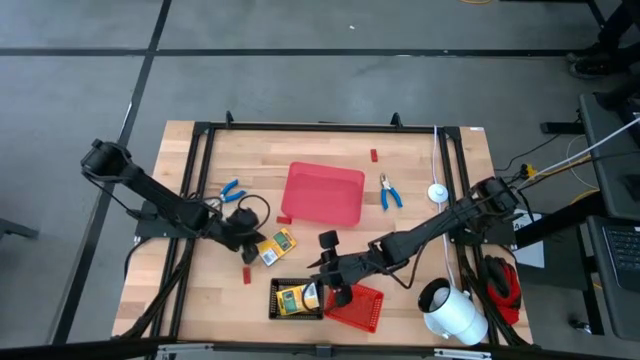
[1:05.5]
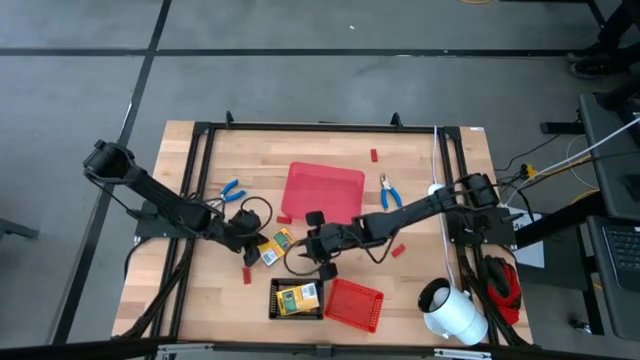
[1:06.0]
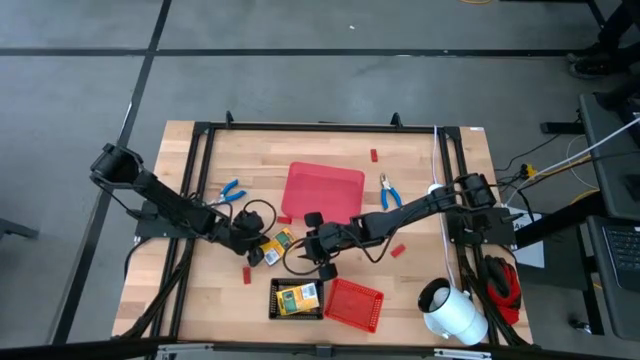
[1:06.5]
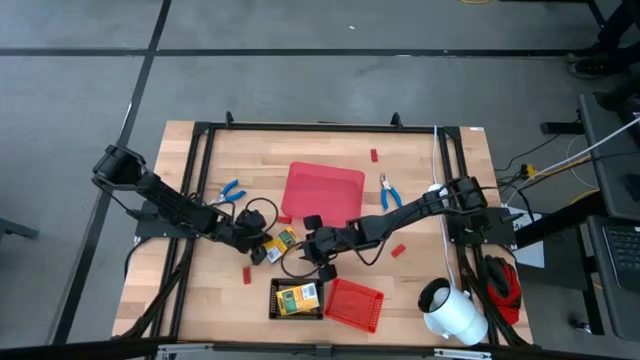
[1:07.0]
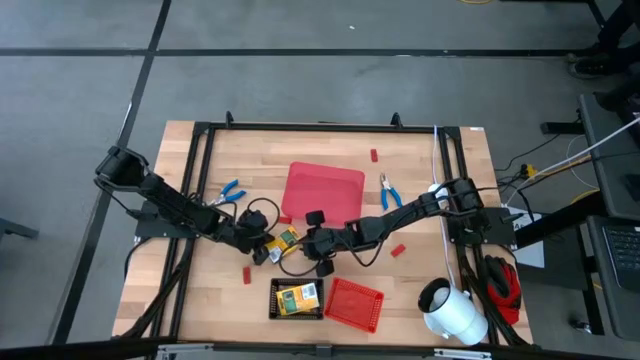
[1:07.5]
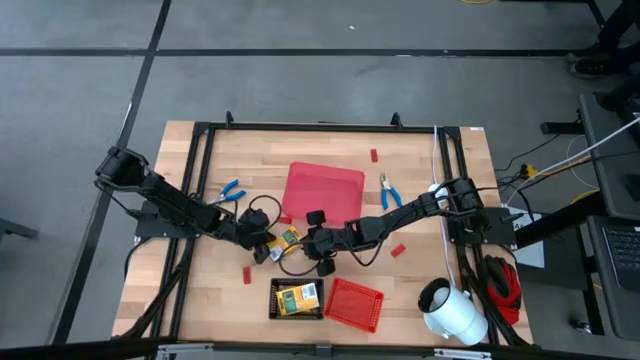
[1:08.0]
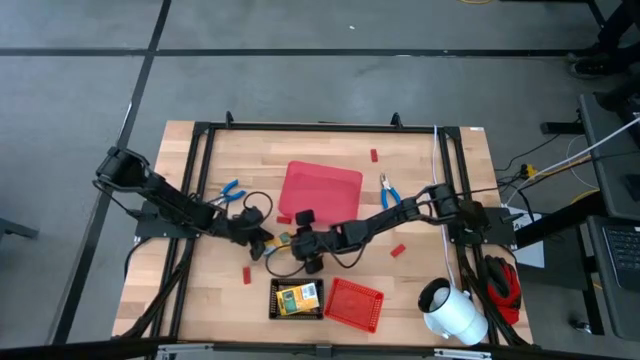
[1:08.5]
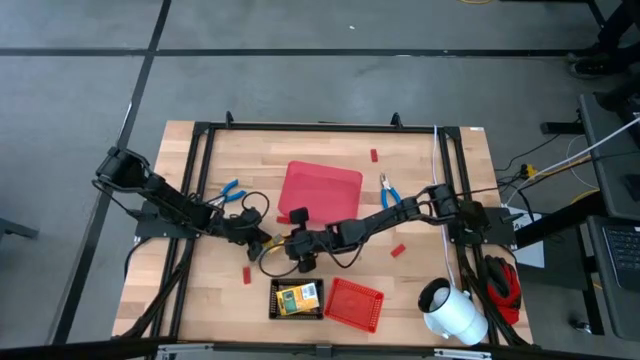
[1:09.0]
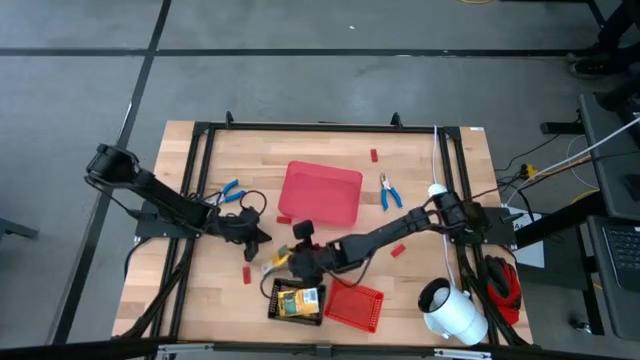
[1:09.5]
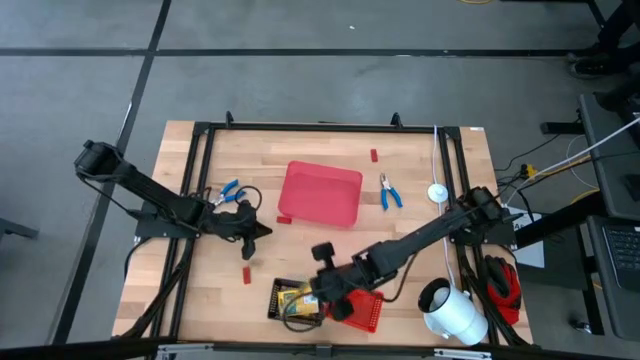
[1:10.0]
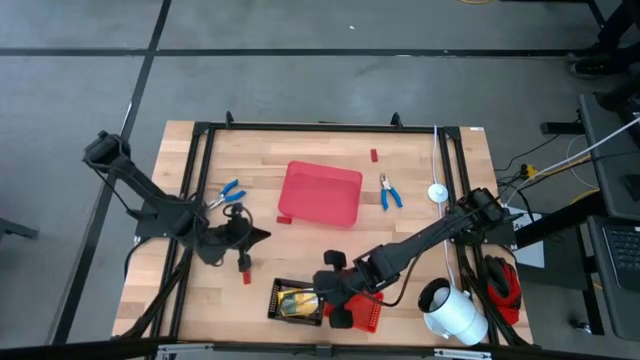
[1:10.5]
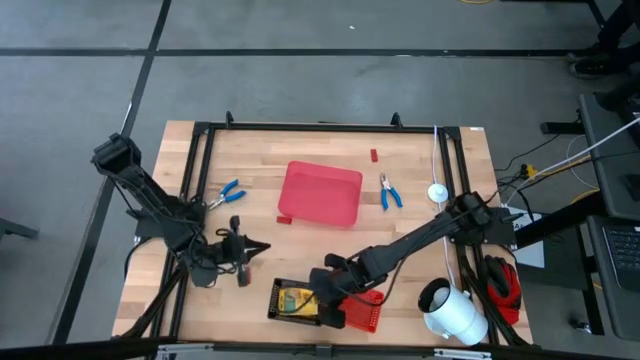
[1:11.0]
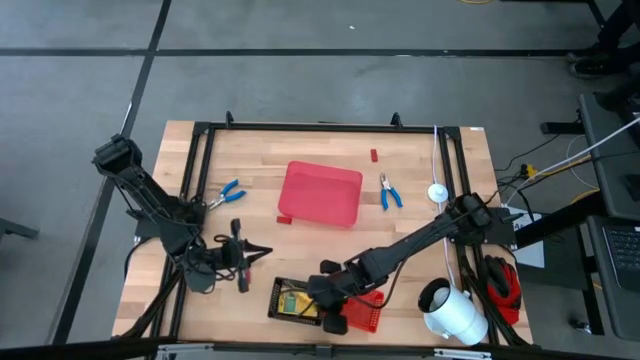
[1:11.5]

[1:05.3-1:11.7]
Task: Pick & Place School Supplies
Put the crayon box into the black bin

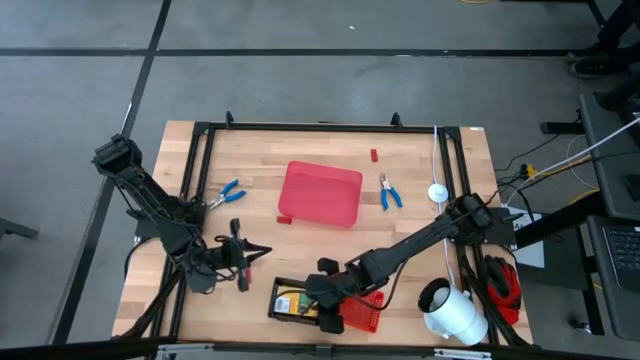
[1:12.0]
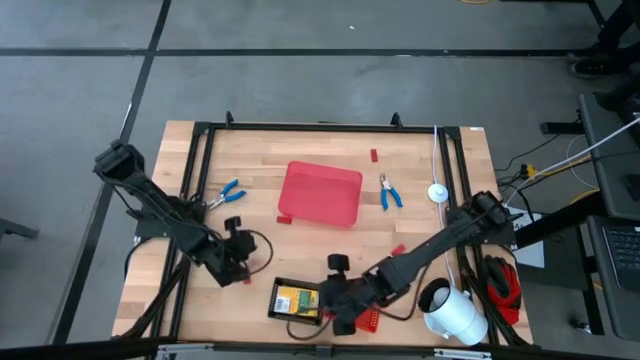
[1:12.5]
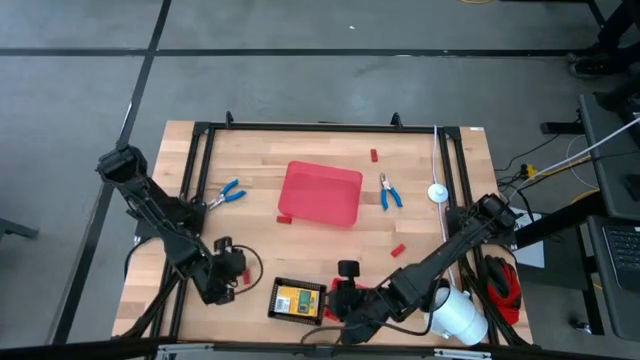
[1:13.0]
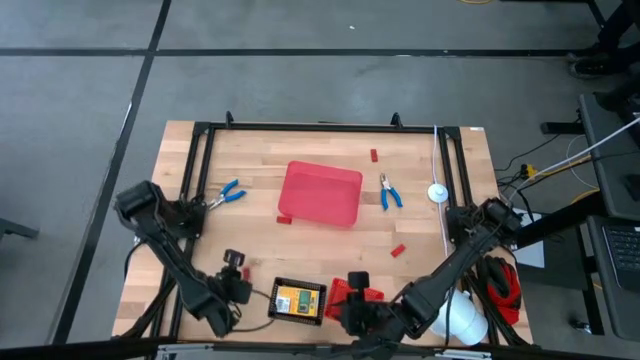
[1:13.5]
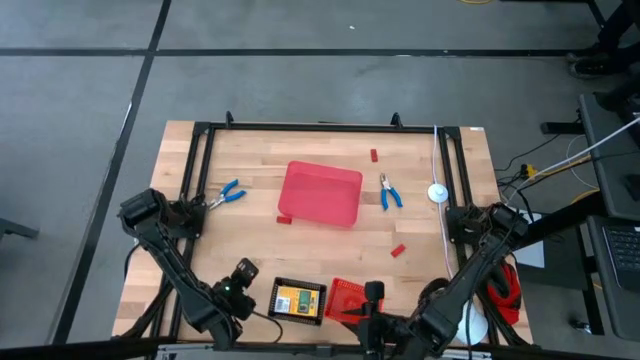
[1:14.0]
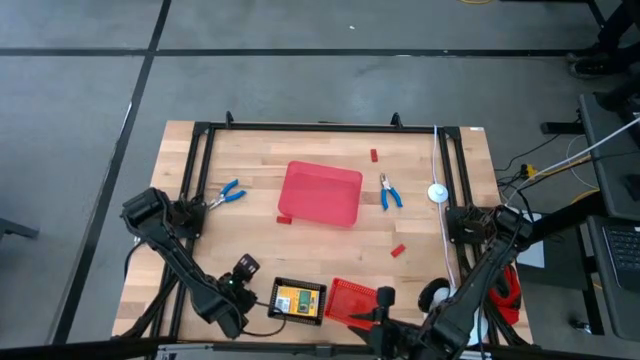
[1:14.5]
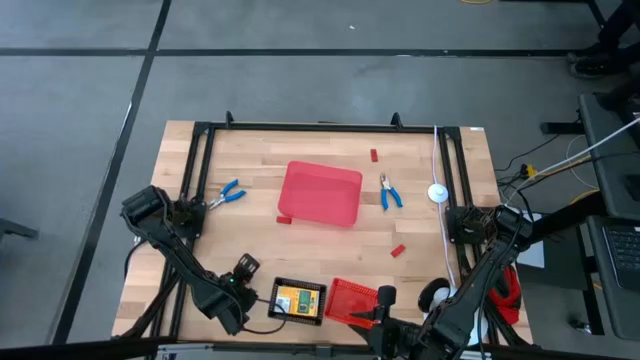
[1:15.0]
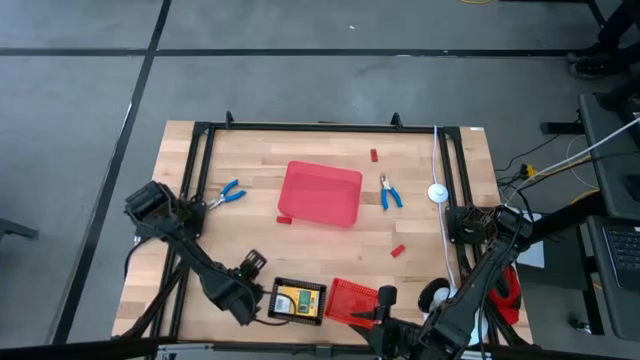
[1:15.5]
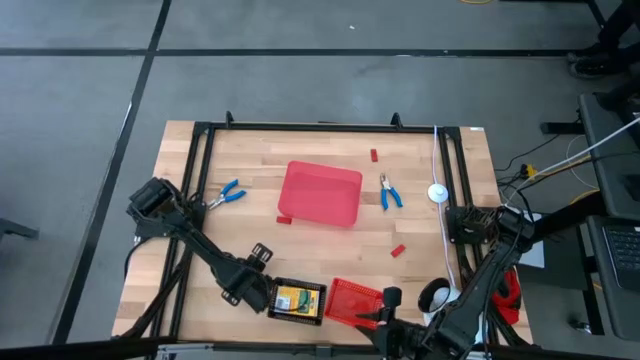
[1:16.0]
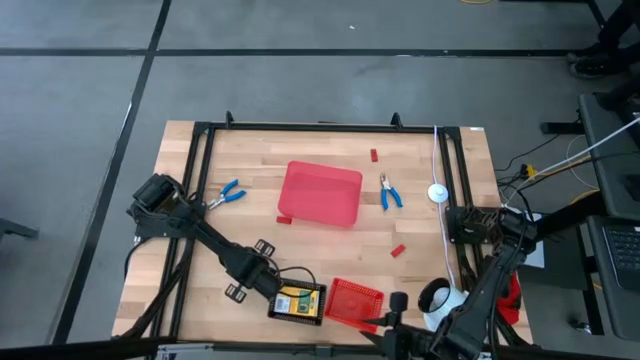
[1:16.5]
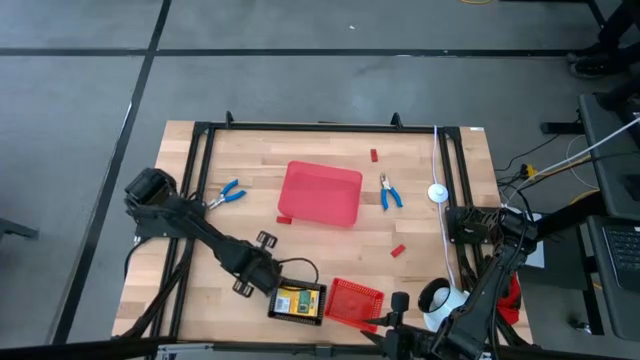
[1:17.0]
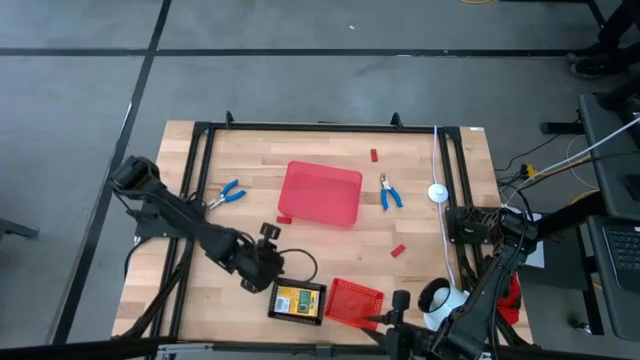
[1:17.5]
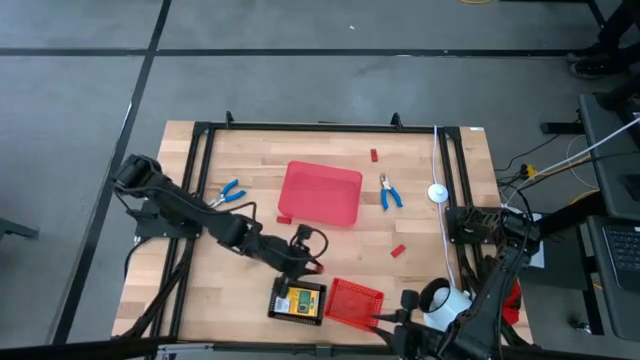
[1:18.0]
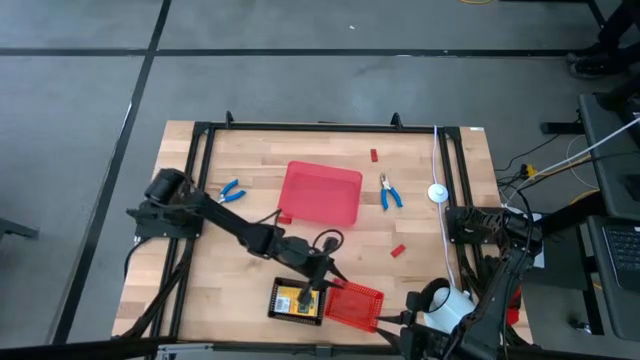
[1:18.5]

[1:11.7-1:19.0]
Put the red eraser into the red bin

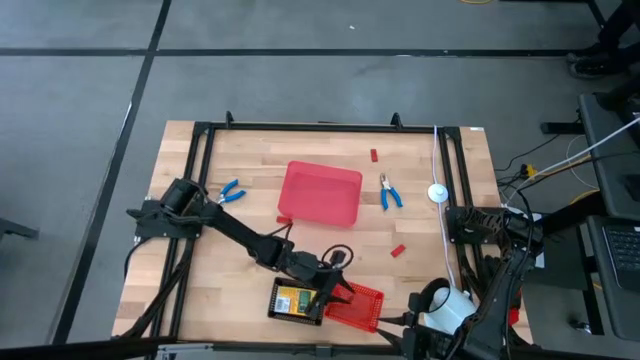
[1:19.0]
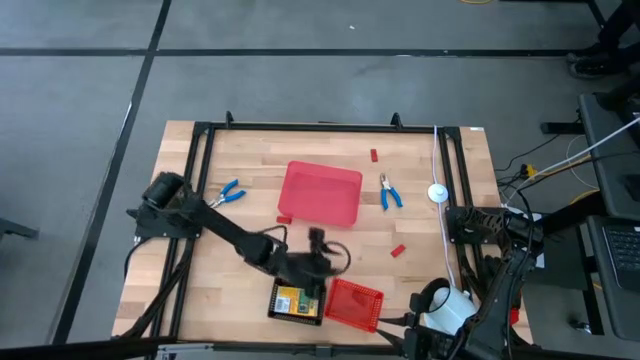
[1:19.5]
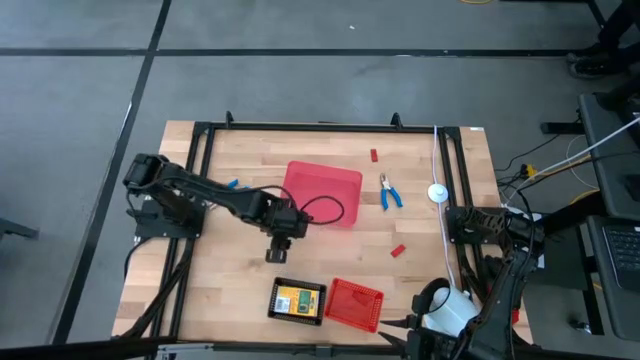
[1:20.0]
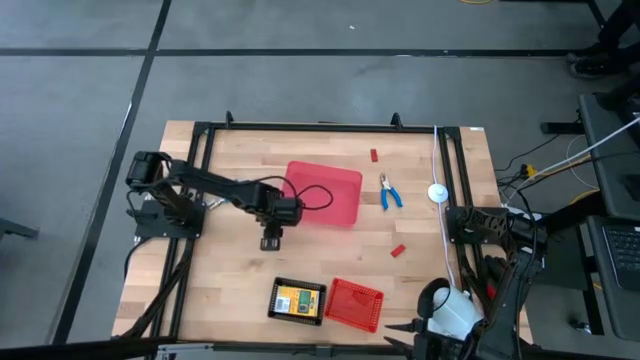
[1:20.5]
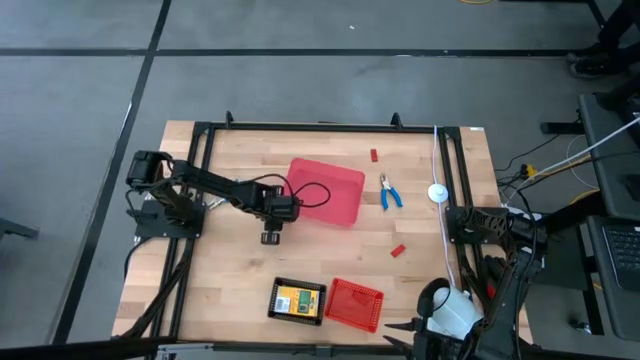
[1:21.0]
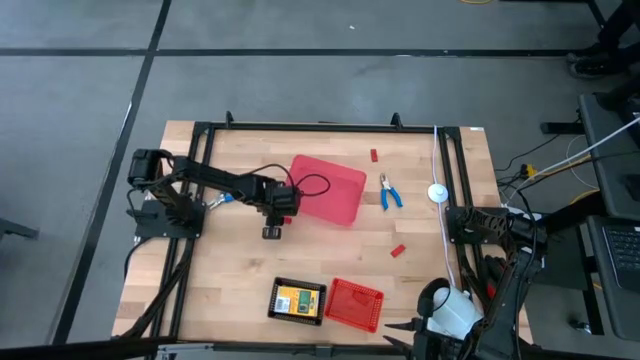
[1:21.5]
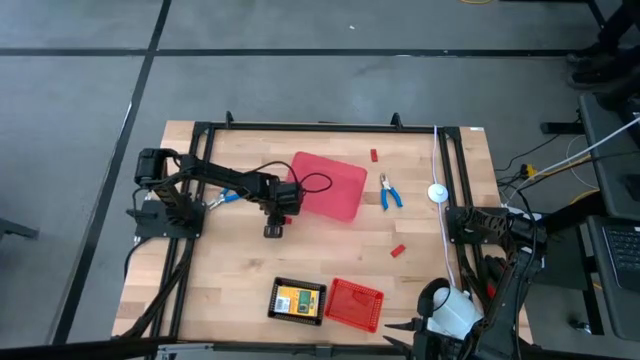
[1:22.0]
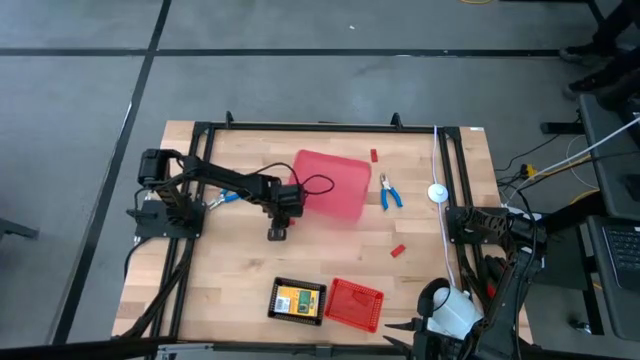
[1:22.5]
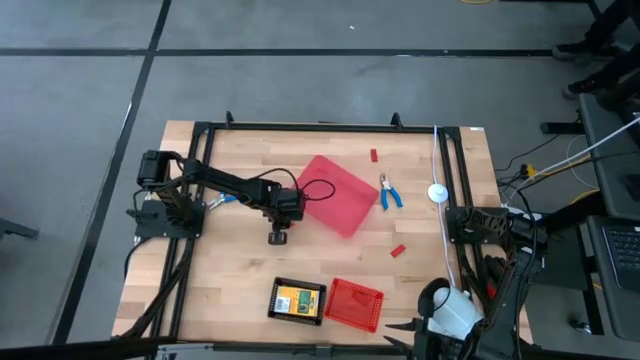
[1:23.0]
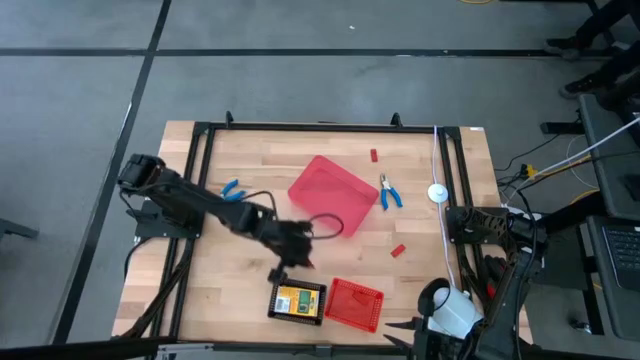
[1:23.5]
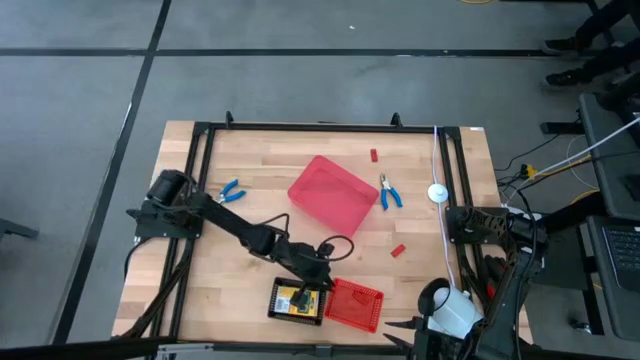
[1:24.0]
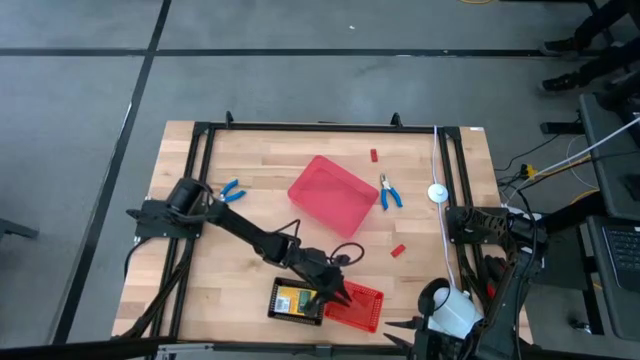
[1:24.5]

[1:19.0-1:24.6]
Put the red eraser into the red bin

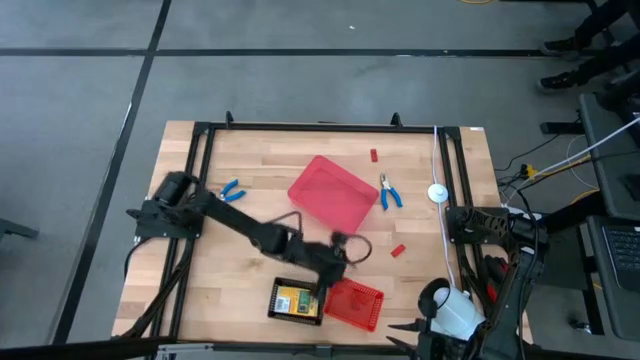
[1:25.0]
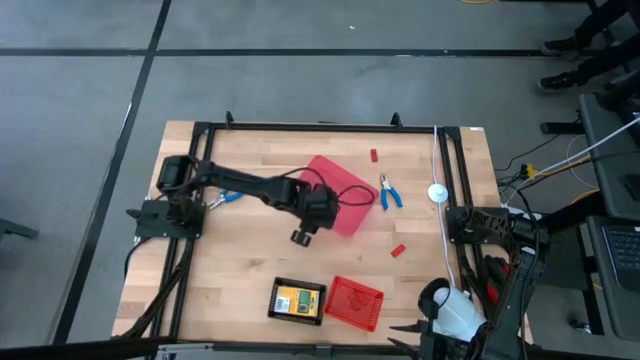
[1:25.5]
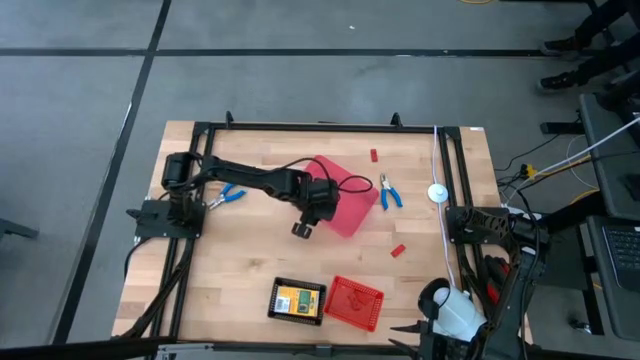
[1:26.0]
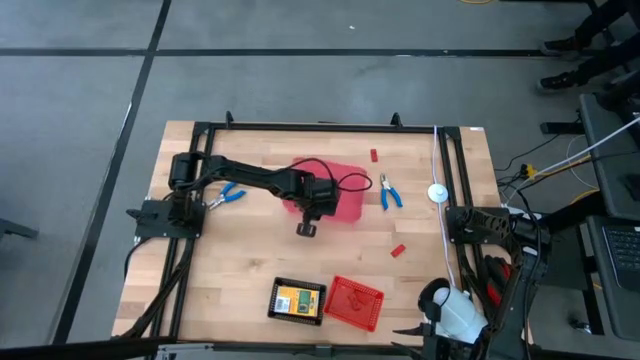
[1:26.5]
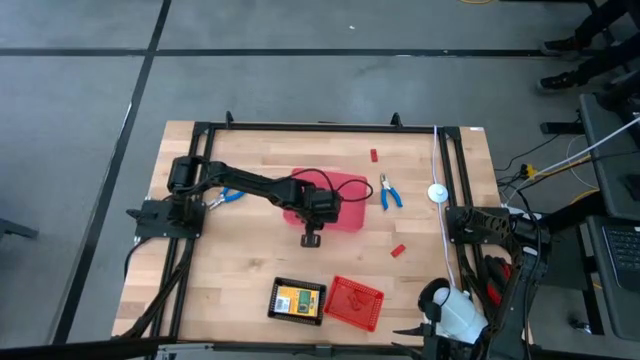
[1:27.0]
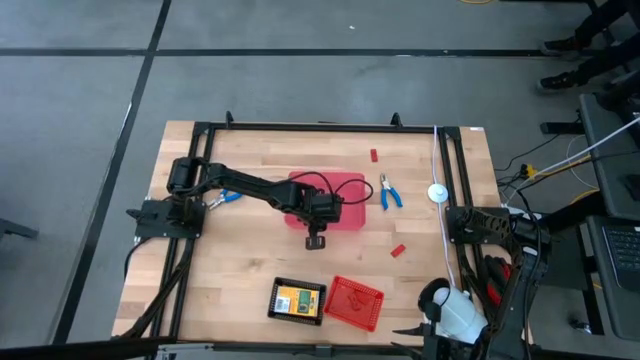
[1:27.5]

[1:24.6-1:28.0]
Adjust the pink bin
